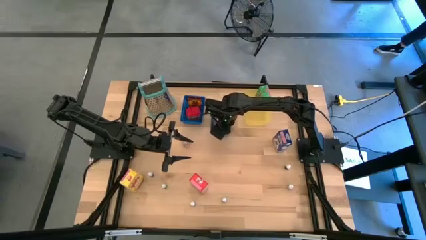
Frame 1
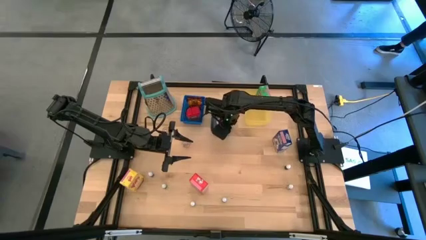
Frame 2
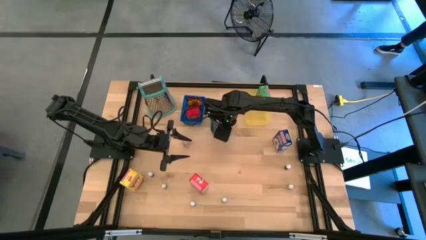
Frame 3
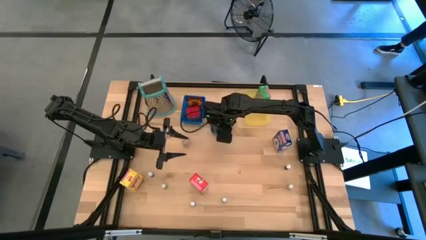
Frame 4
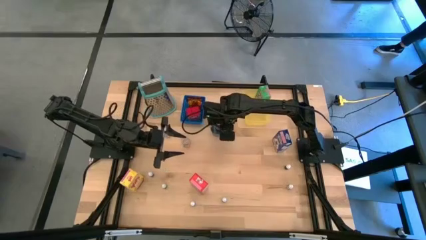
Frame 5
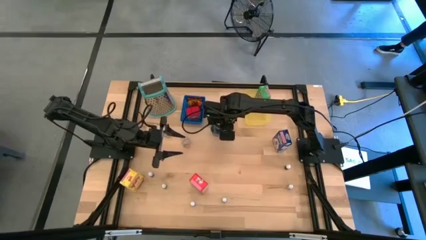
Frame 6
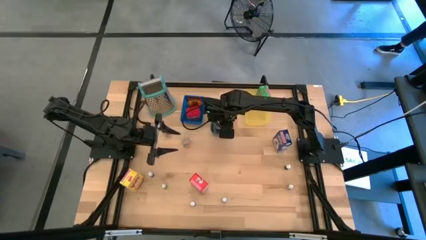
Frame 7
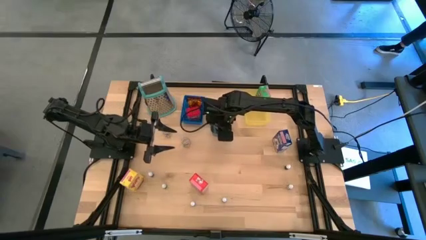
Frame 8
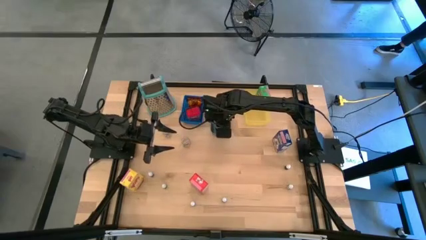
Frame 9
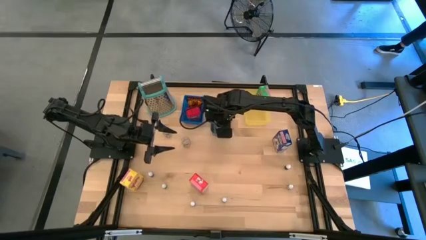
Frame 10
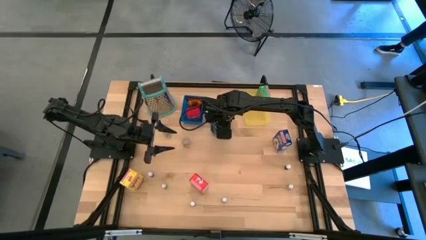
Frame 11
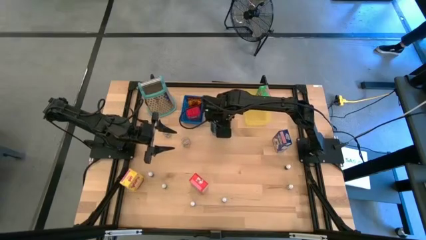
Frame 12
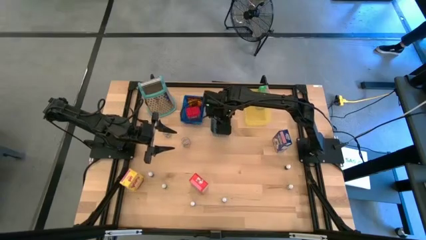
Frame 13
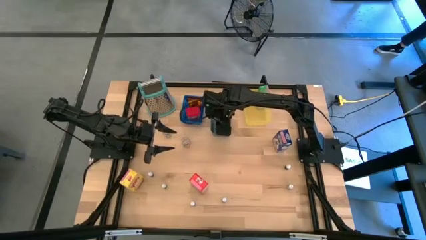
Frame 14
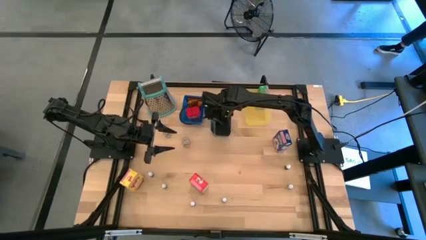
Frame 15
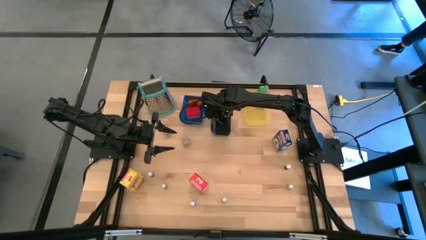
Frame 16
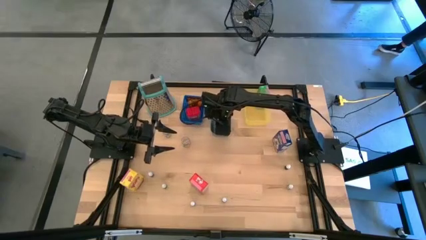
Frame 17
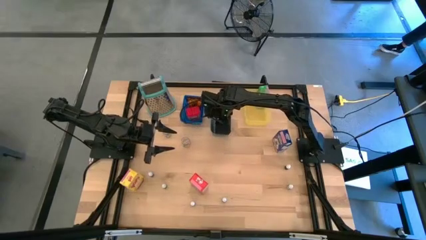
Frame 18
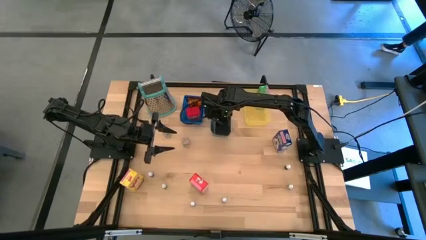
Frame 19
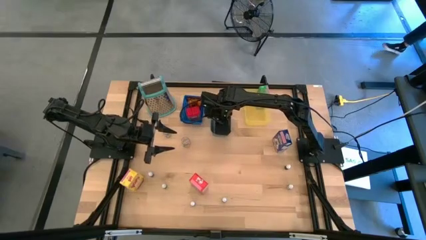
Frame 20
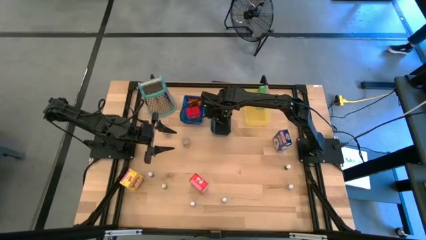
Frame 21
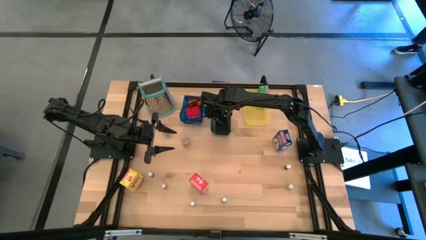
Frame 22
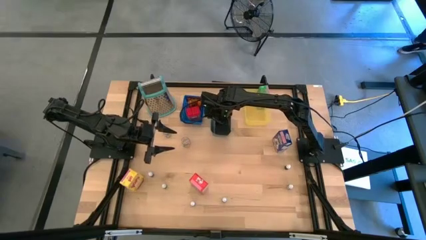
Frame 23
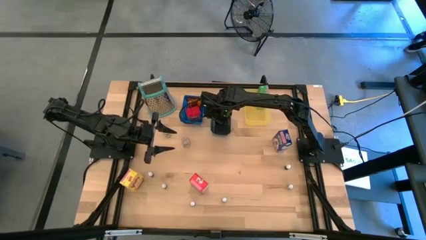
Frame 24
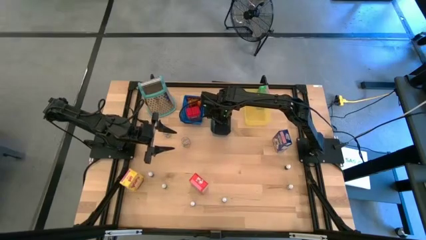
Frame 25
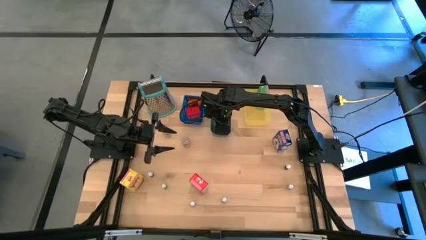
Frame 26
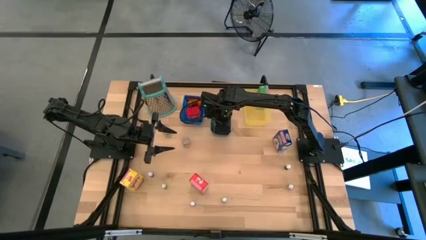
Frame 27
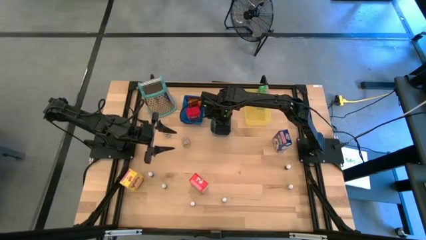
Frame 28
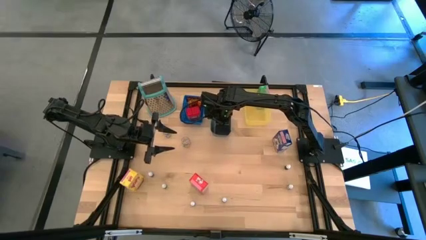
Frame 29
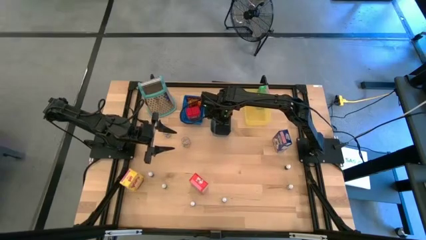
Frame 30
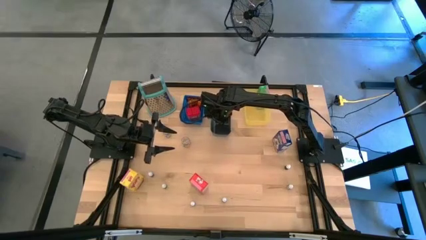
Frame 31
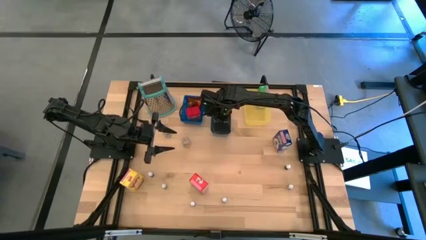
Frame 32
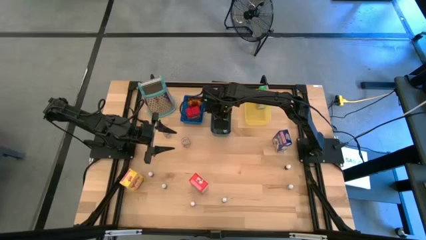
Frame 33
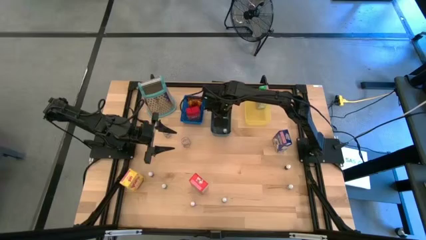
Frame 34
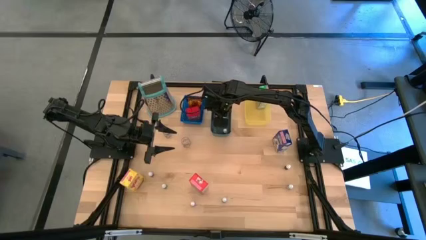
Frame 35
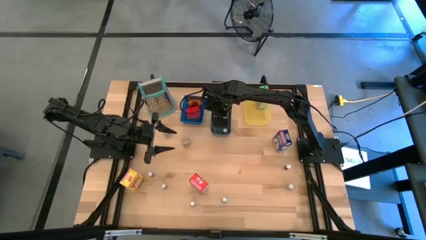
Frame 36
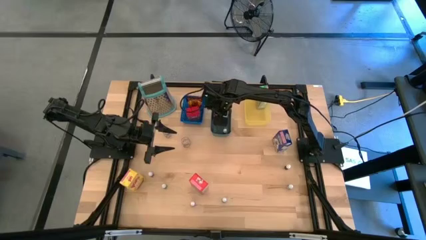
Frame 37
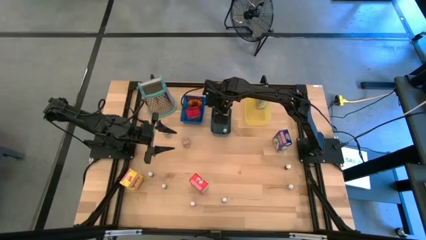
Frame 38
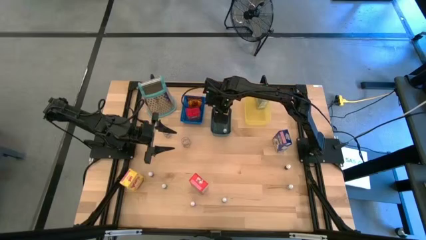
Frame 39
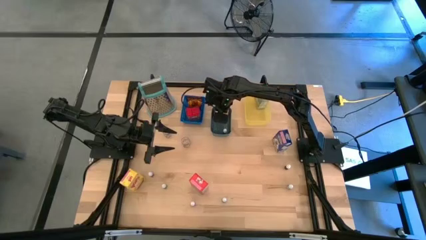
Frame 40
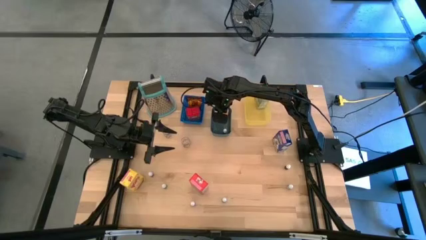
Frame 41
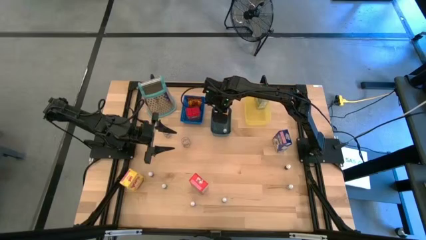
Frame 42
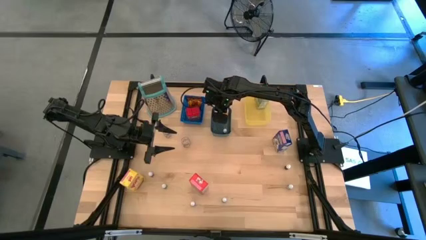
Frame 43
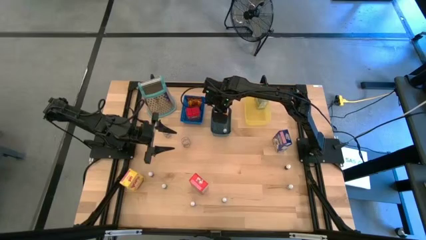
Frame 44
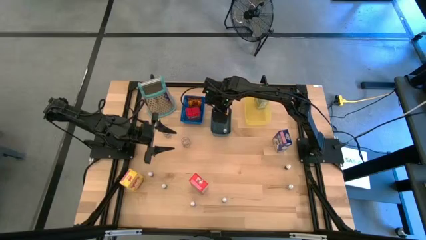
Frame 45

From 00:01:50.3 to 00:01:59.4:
Task: Pick & Place Kitchen Items
Adjust the big red food coloring in the dark green bin

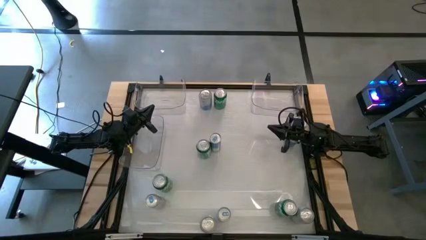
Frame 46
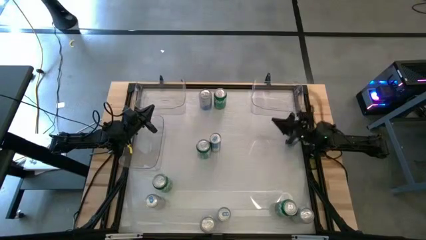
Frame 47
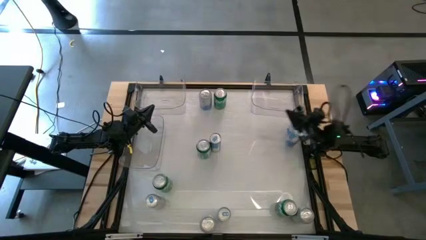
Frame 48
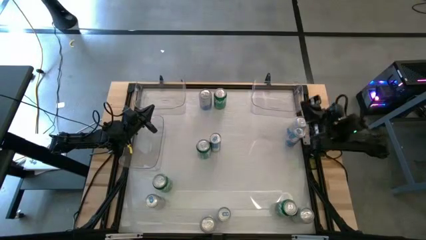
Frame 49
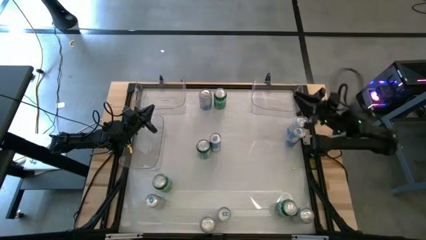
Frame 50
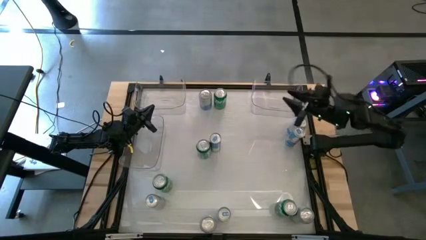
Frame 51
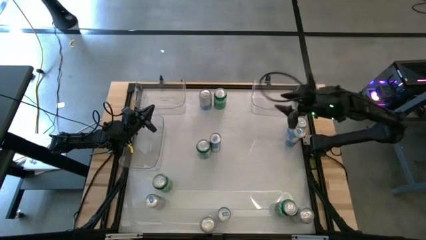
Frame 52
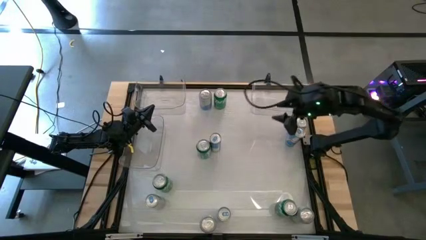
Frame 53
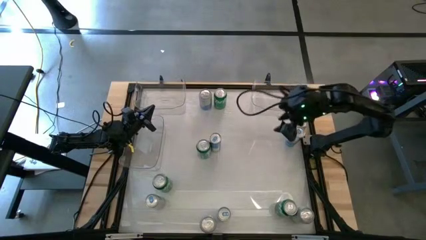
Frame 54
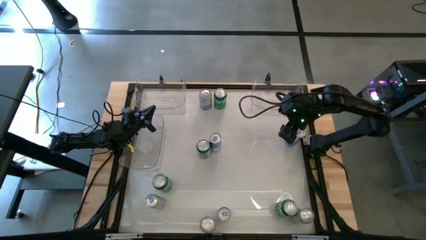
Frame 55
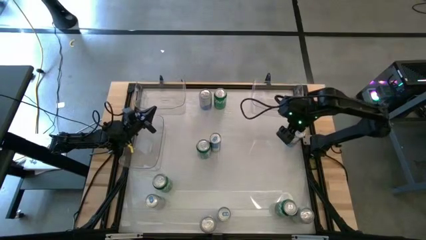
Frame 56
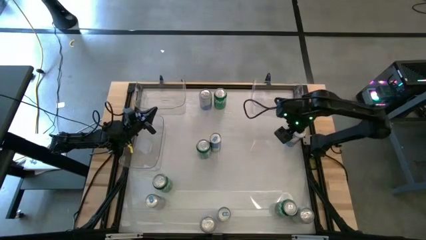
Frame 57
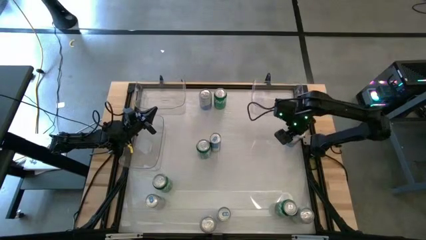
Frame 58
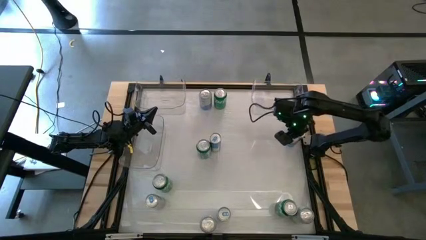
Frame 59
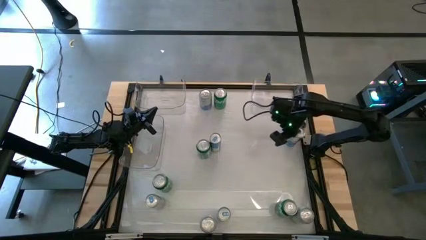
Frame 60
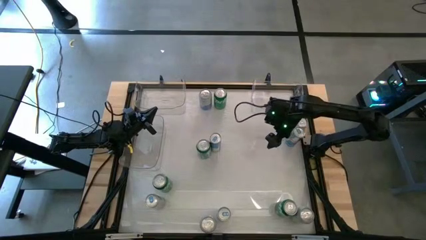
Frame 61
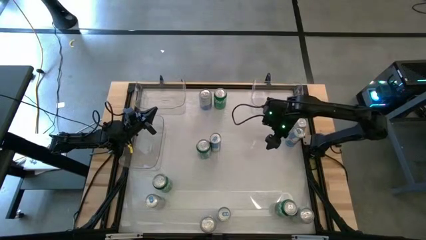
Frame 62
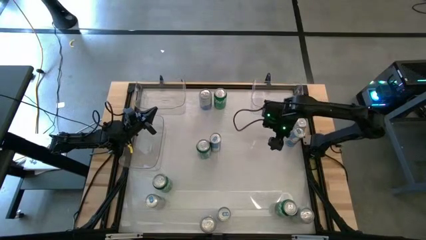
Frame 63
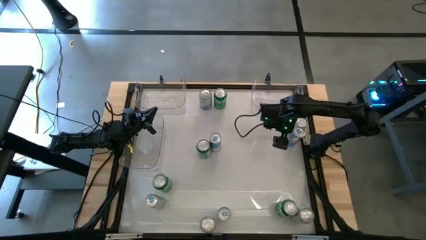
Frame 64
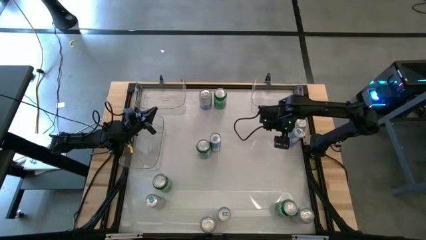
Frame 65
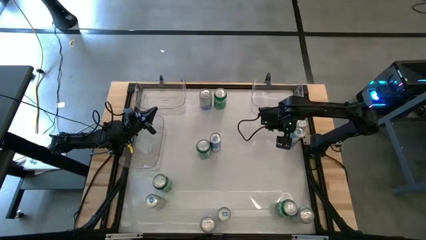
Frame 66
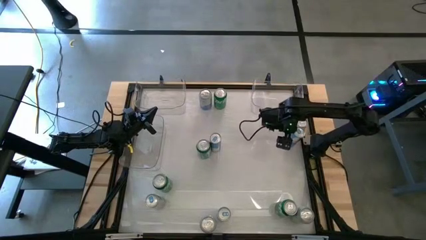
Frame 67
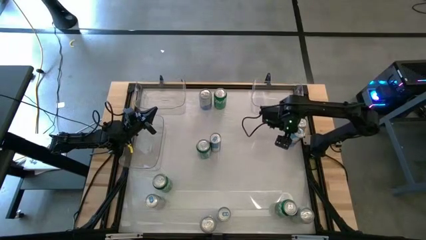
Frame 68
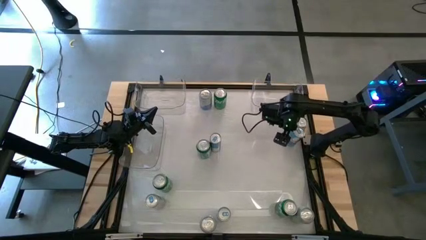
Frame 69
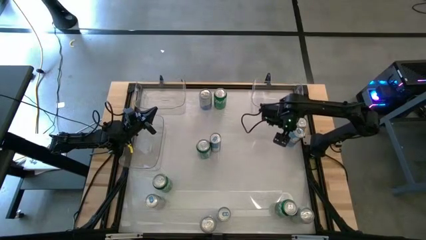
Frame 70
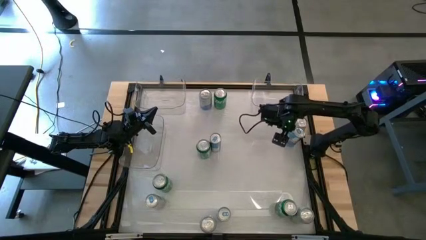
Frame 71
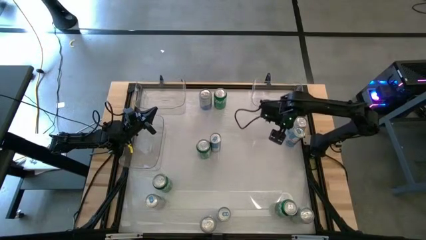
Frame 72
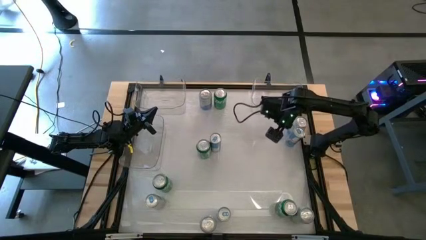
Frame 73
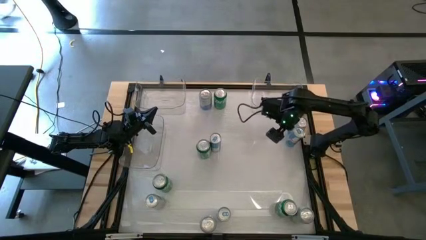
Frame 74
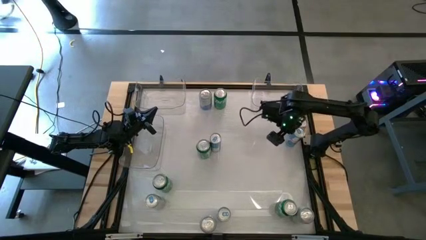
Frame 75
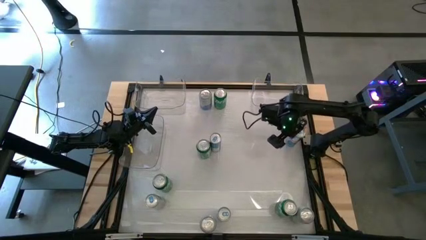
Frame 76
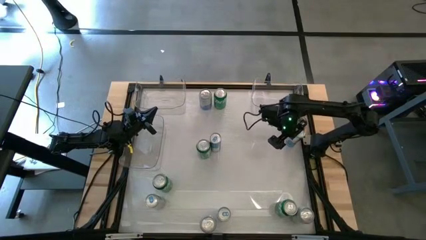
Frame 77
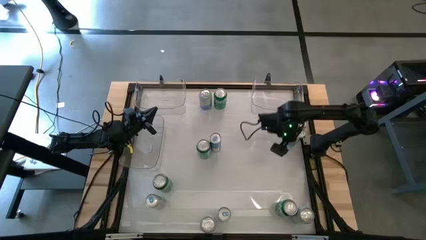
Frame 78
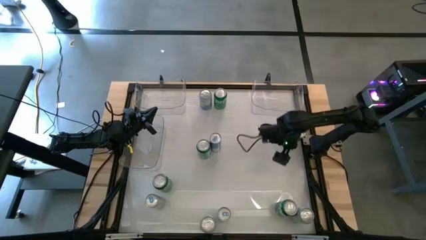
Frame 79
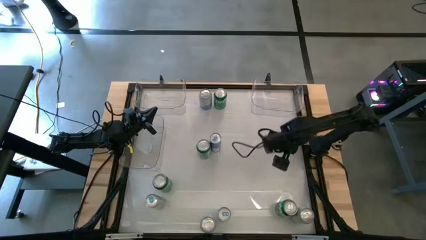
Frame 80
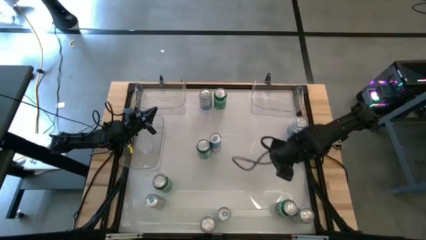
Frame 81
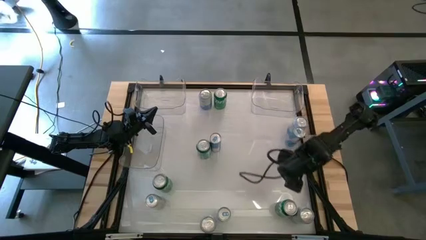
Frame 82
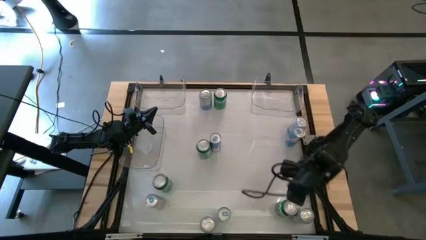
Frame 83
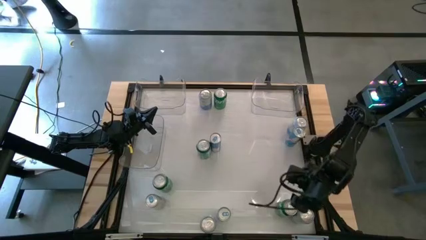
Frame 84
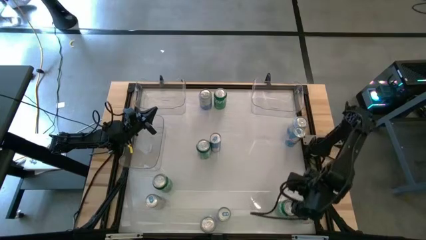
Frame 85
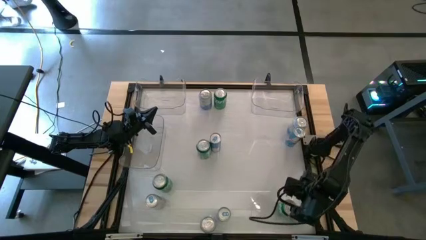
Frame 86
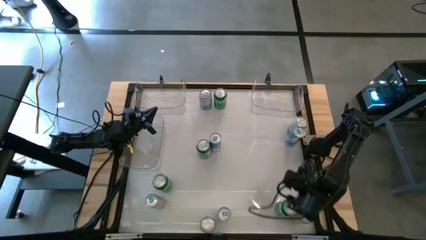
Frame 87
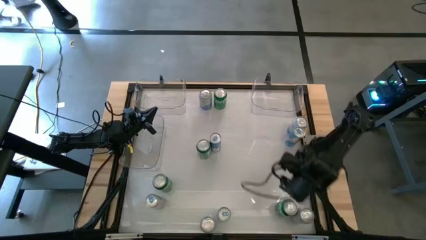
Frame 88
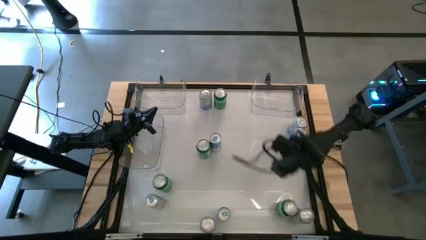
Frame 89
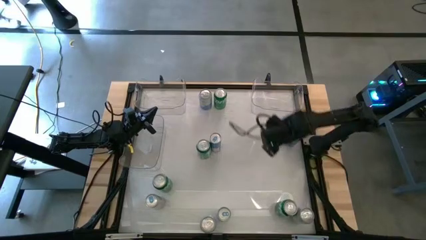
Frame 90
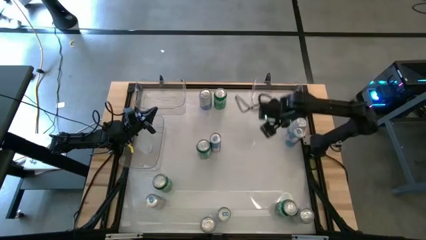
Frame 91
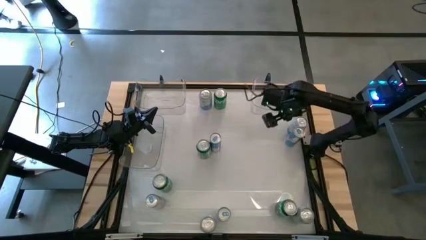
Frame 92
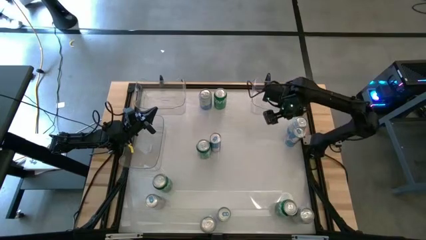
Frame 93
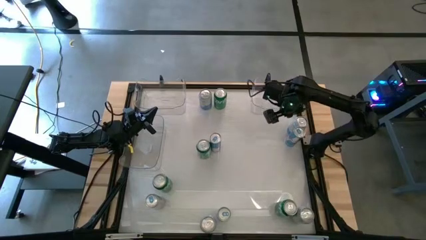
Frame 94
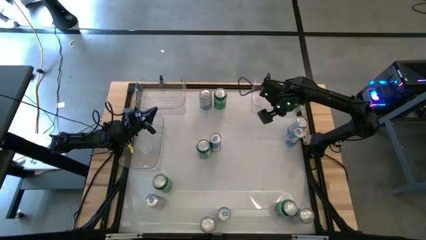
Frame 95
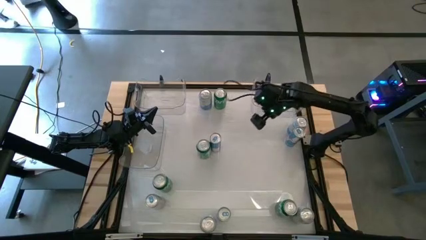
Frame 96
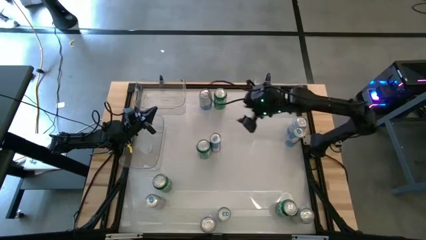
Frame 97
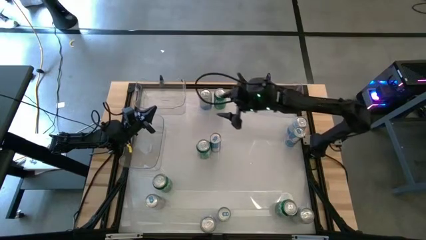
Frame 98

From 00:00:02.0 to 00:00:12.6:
Task: Sort soda cans
Put the top center green soda can into the top right transparent bin
